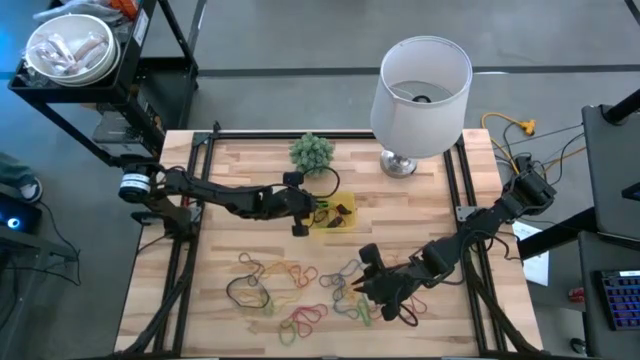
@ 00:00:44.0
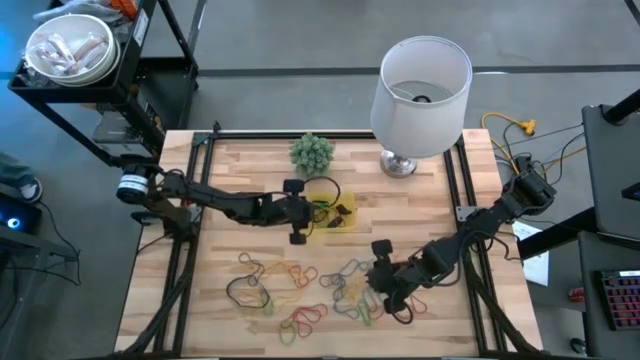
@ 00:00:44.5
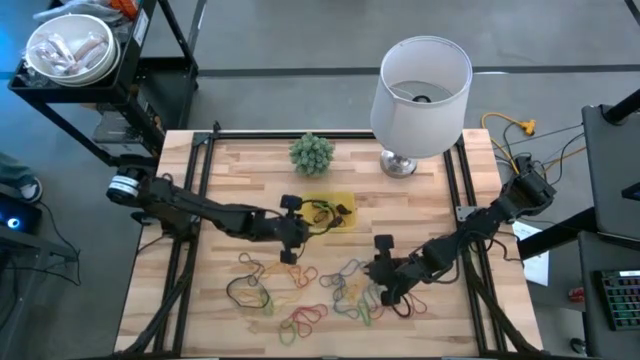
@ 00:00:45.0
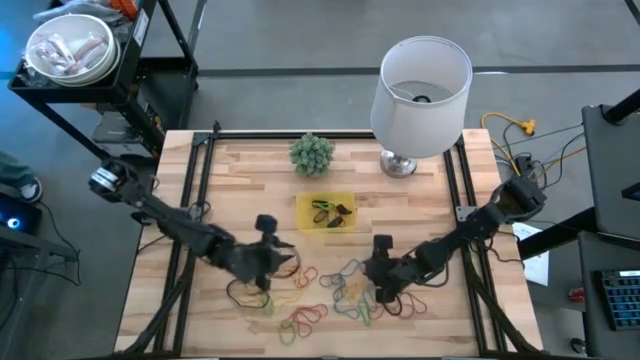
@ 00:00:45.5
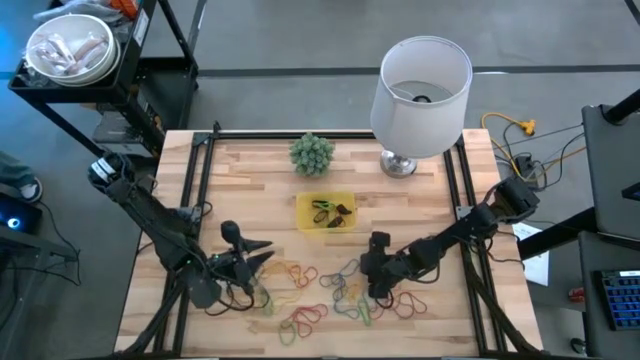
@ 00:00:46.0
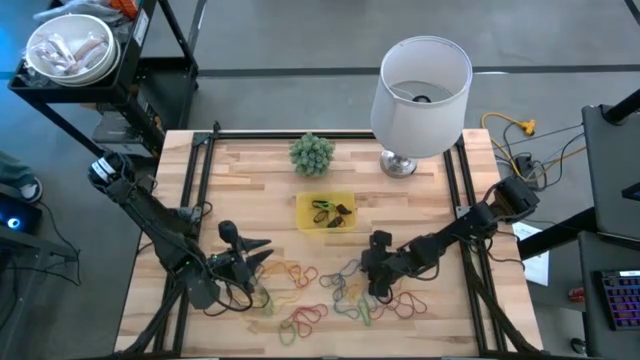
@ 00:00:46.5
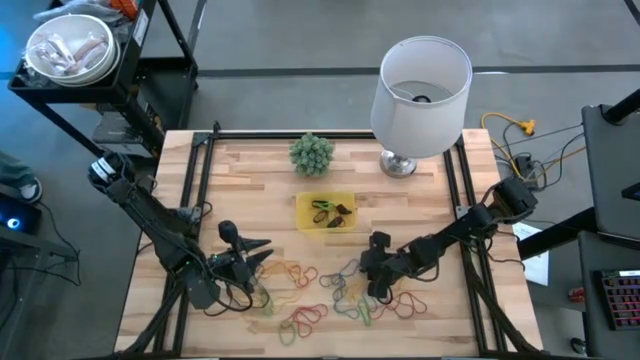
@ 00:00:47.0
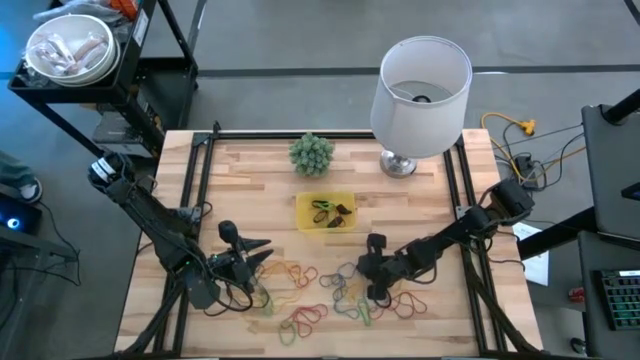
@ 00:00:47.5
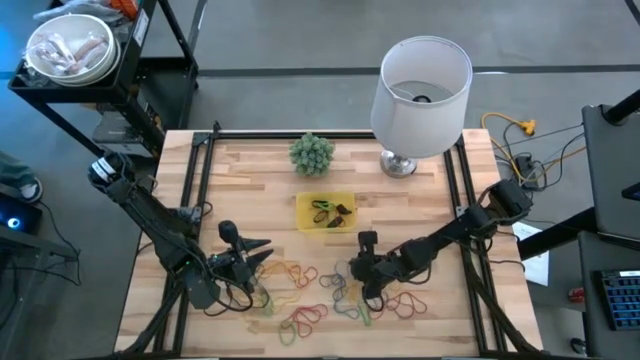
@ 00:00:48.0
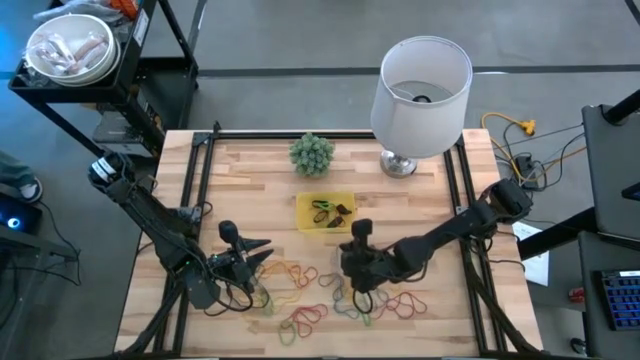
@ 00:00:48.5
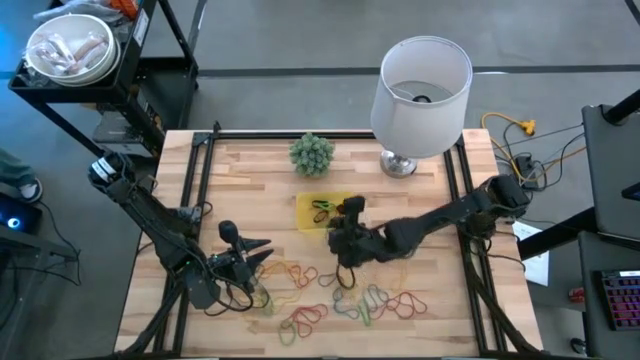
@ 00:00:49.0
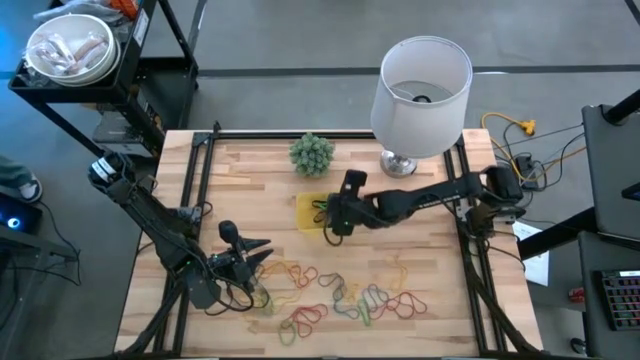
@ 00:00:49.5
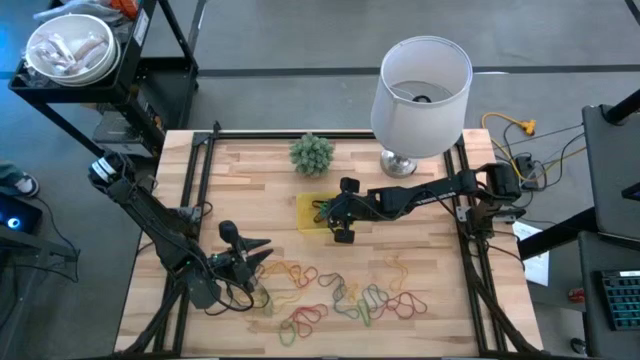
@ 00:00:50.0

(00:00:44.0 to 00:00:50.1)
Task: Pick and place rubber bands into bin
Put the blue rubber band into the yellow bin

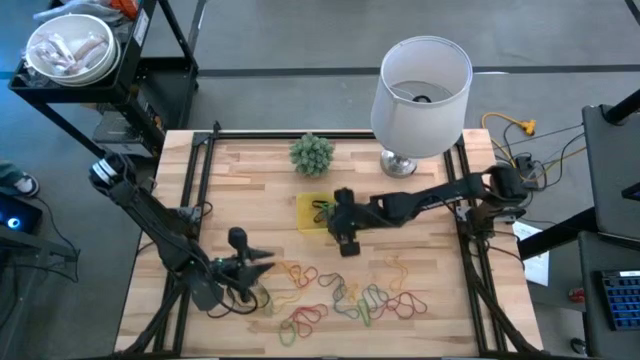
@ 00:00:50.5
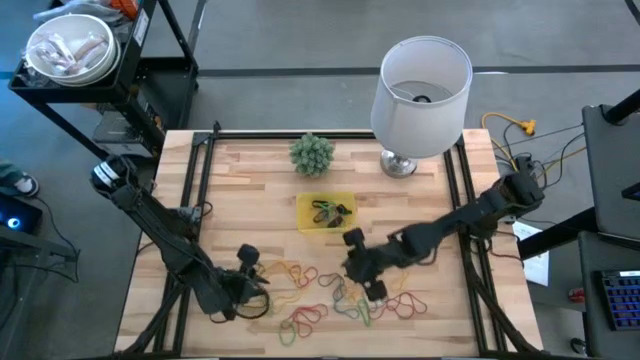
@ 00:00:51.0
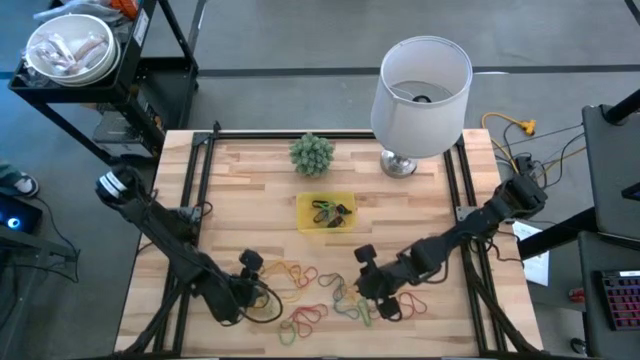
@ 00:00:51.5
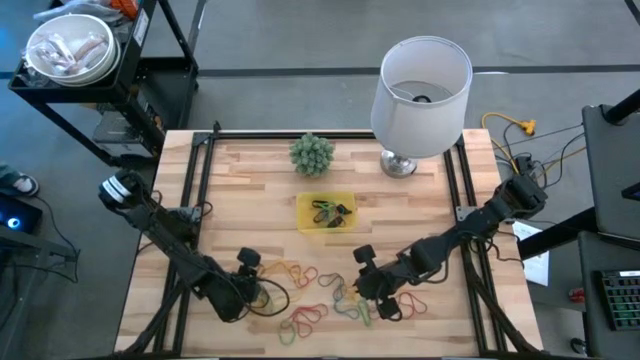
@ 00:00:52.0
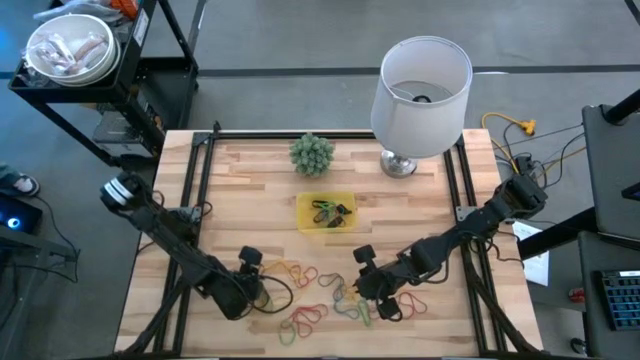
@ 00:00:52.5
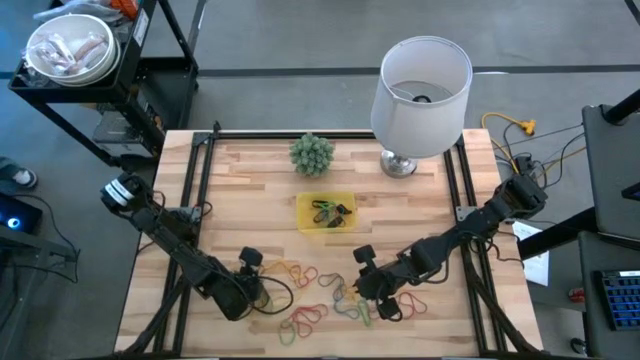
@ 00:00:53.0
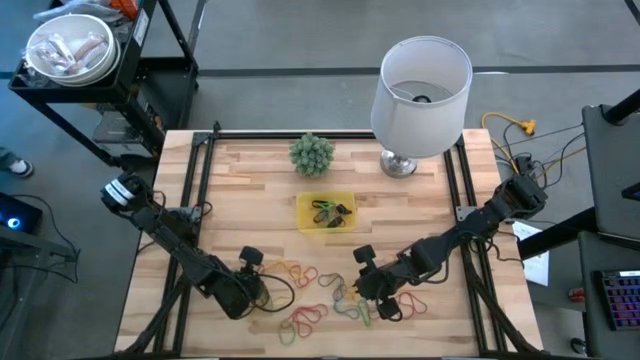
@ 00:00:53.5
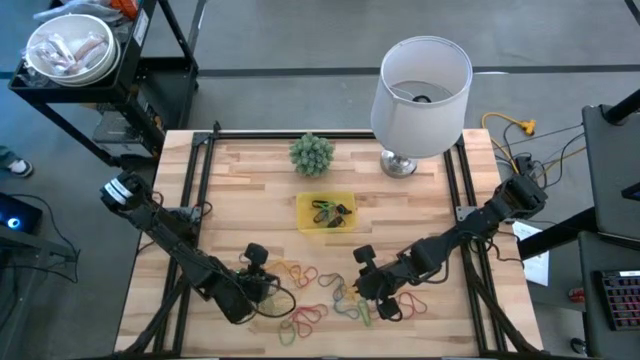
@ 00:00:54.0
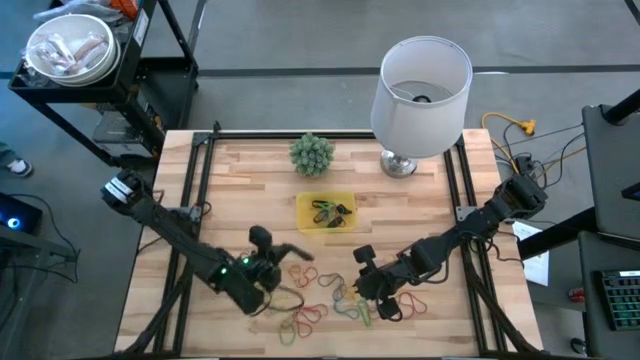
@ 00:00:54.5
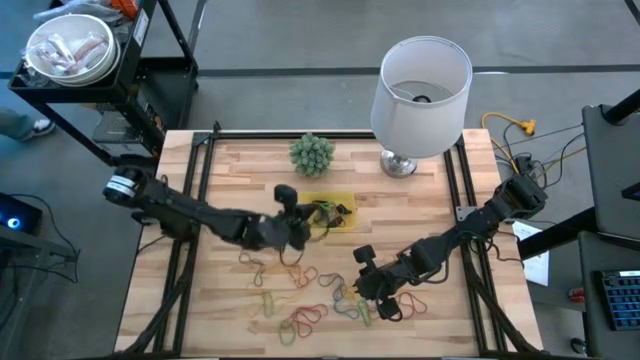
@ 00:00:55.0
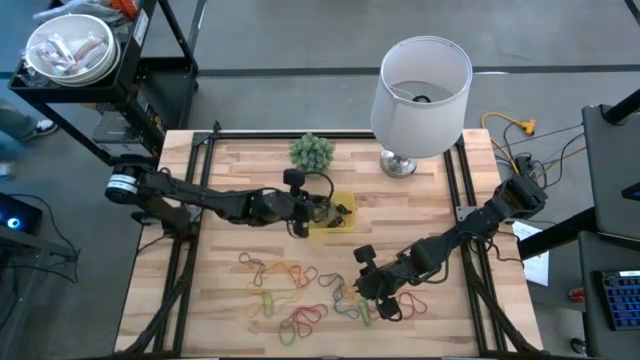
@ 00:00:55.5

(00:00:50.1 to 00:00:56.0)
Put the black rubber band into the yellow bin

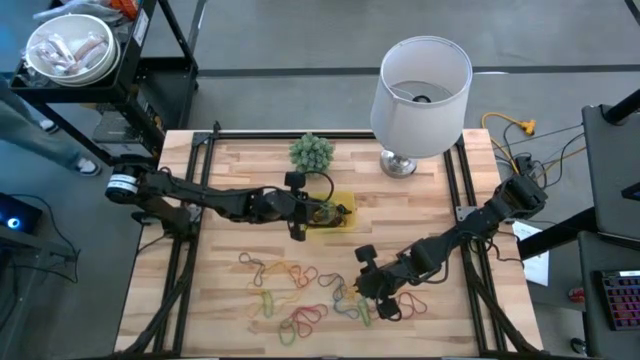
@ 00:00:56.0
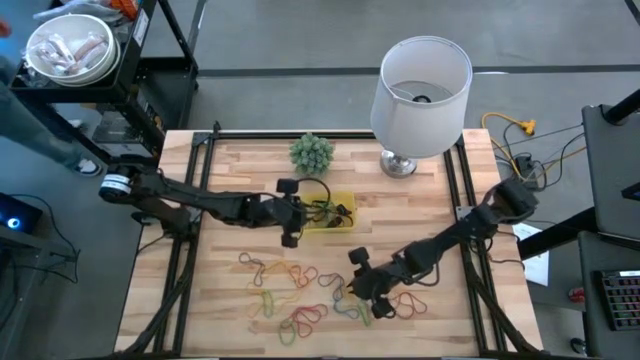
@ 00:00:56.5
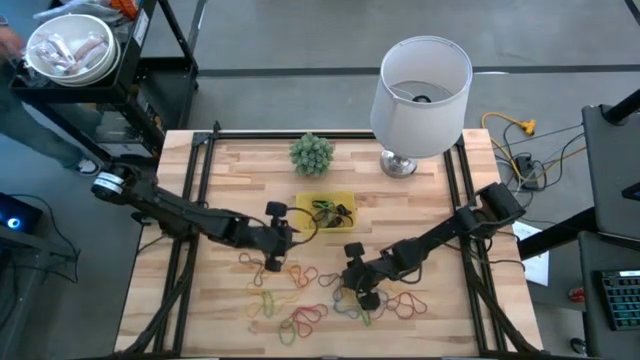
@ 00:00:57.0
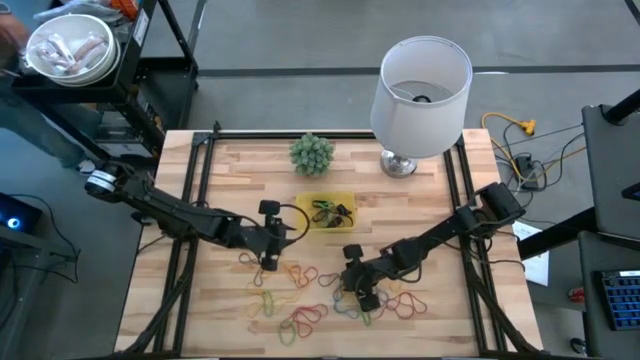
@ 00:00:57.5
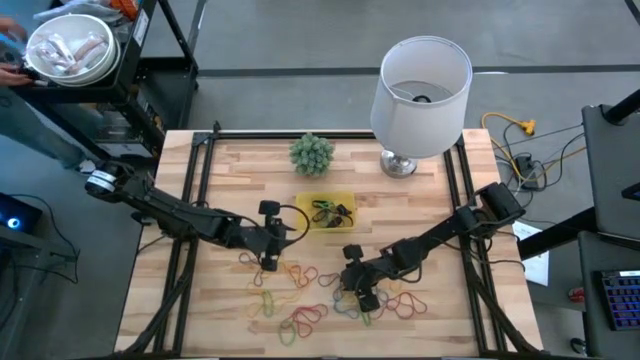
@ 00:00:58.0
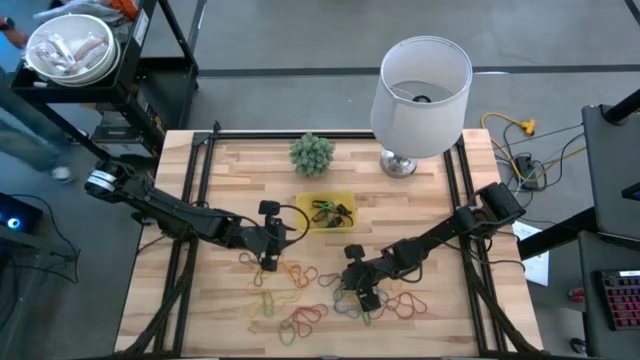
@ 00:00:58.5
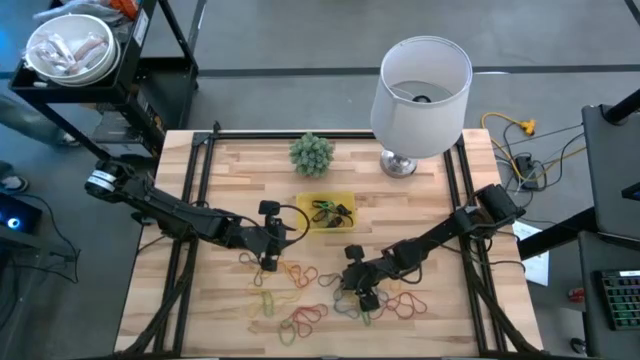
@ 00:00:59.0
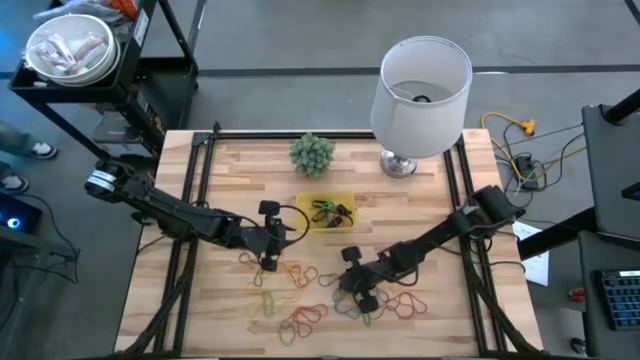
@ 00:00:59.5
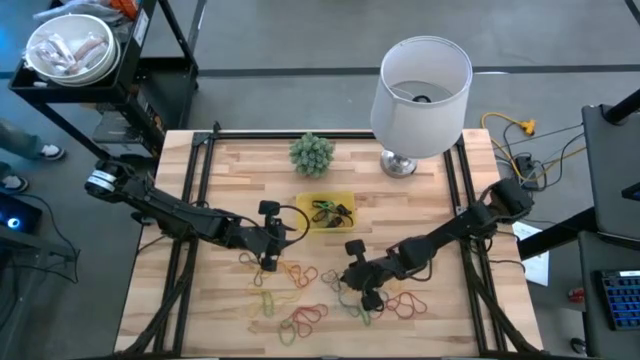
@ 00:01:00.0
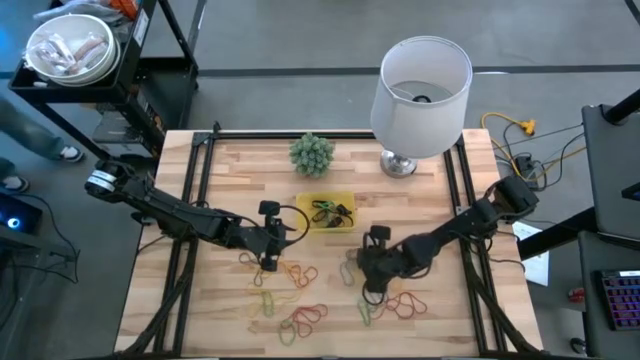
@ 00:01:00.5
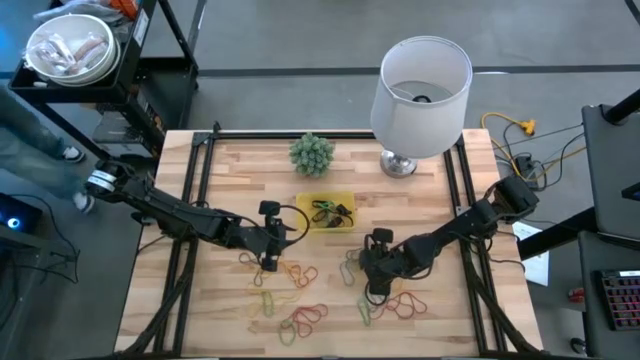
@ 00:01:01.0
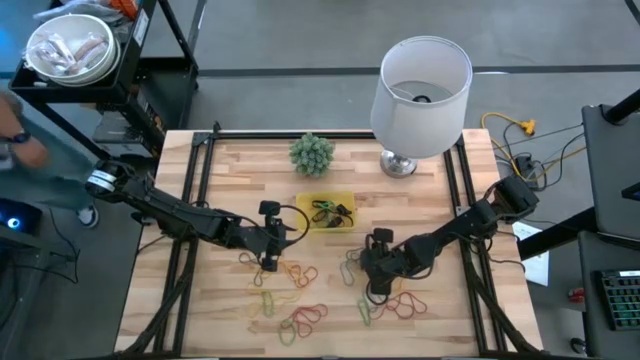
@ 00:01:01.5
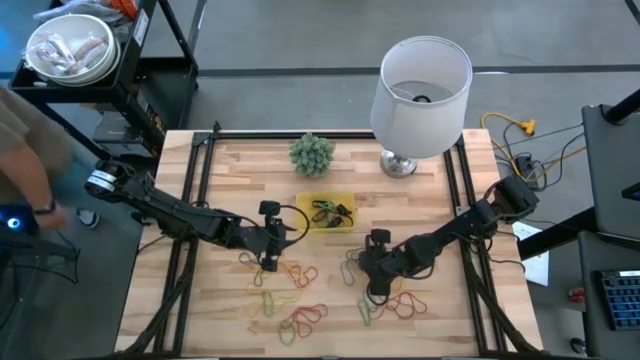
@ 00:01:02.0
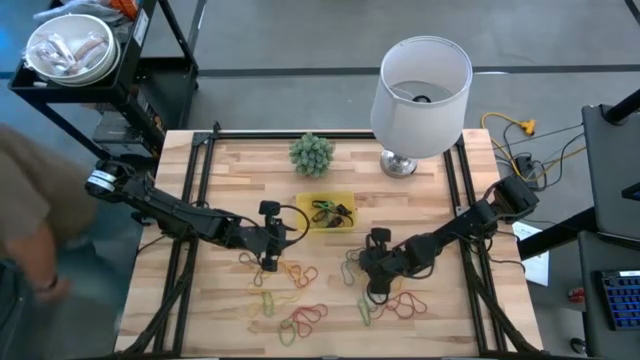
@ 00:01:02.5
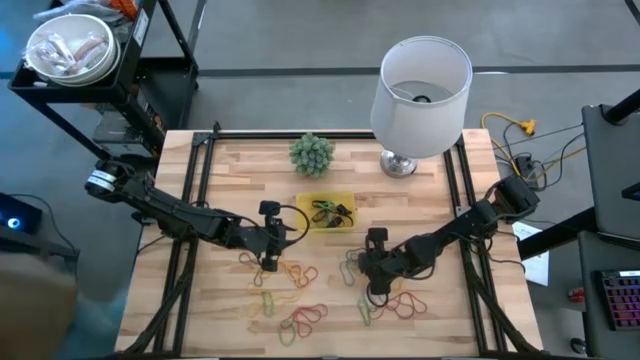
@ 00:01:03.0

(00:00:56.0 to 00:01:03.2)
Put the blue rubber band into the yellow bin

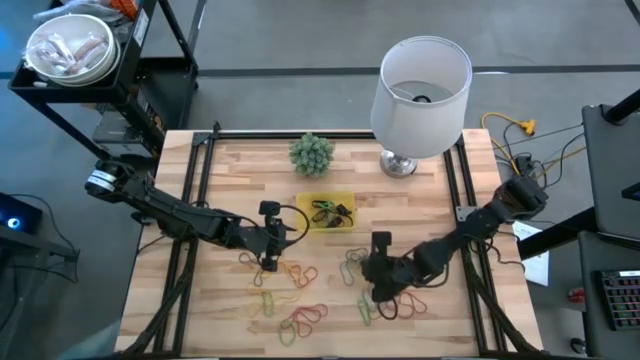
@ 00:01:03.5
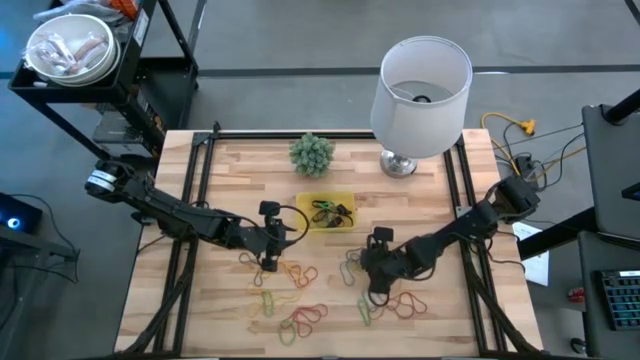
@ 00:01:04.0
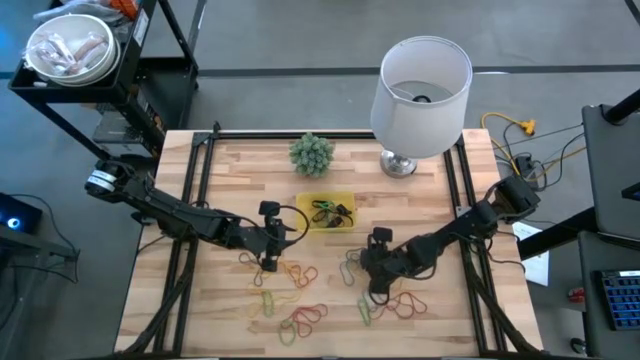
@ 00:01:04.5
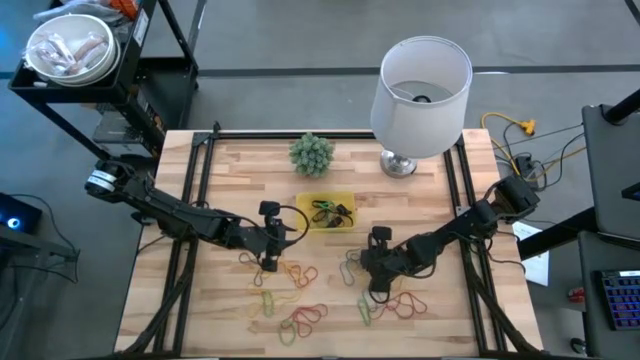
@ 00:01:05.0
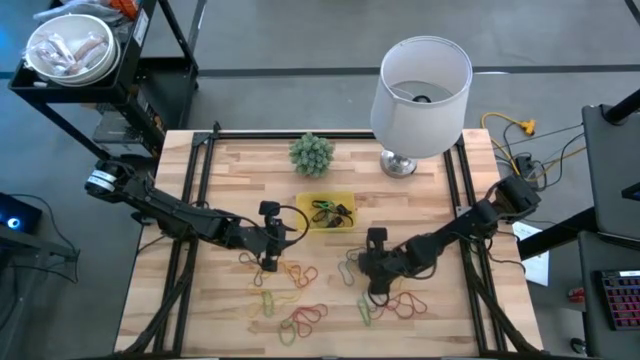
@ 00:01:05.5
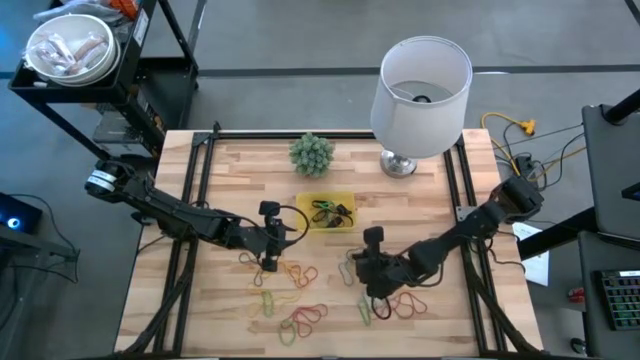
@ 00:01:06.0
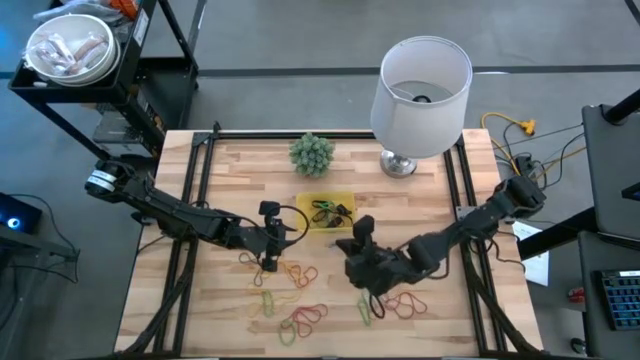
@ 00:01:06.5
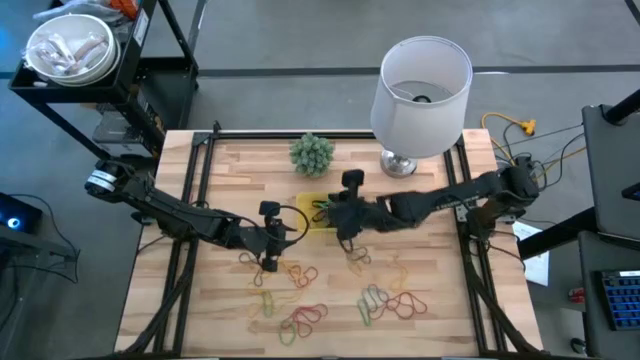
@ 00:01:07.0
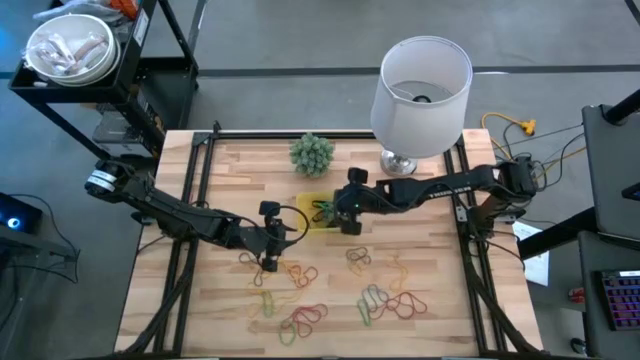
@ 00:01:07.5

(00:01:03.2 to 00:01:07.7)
Put the blue rubber band into the yellow bin
